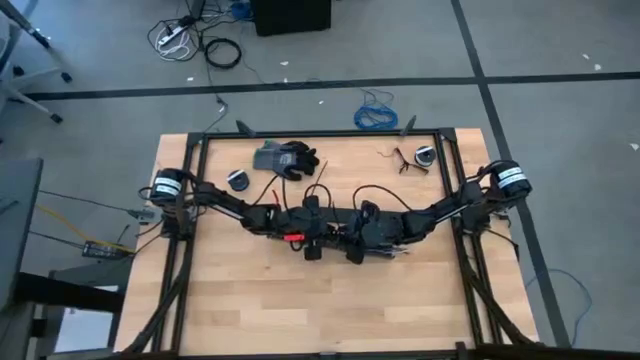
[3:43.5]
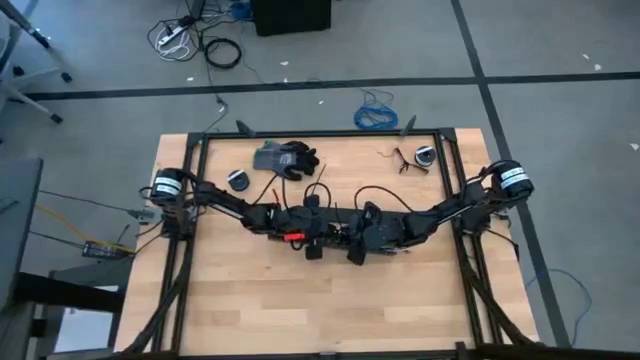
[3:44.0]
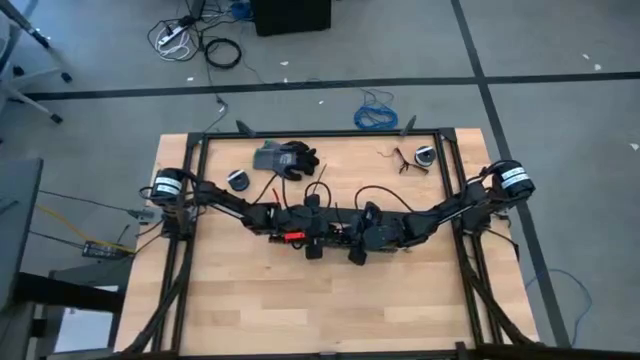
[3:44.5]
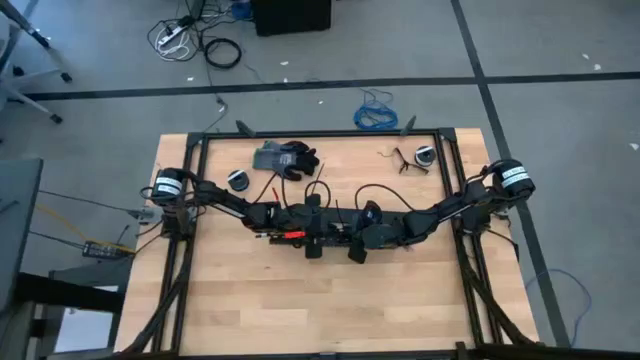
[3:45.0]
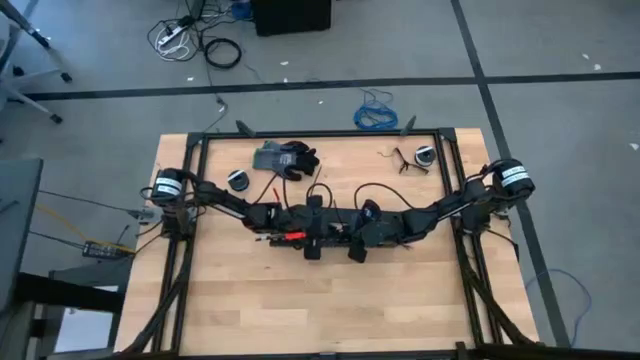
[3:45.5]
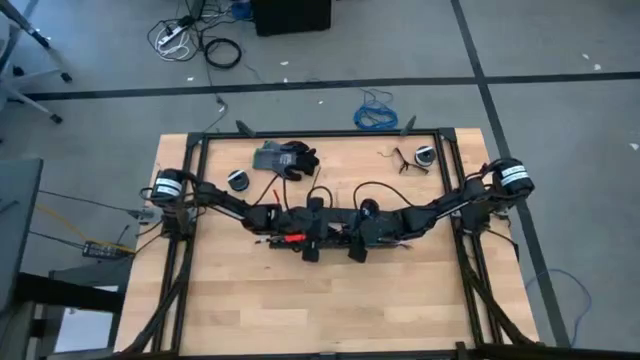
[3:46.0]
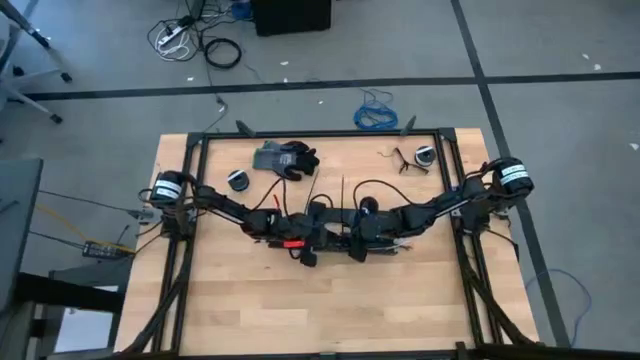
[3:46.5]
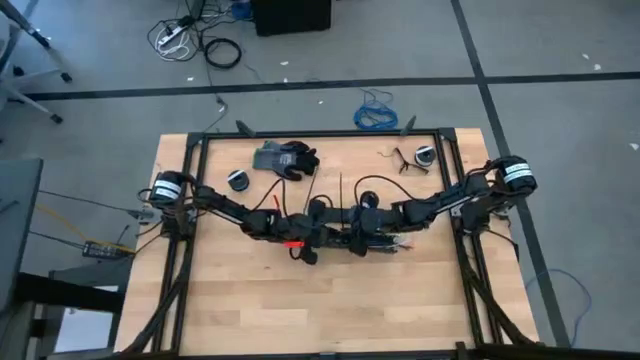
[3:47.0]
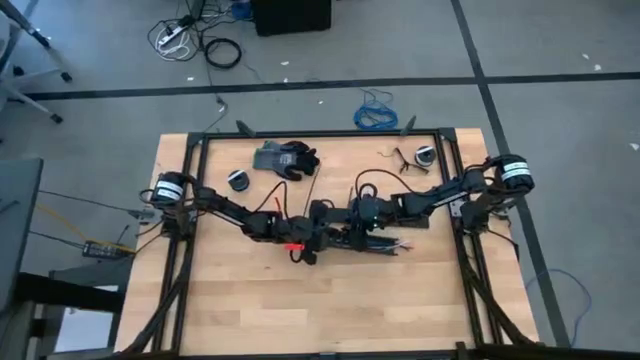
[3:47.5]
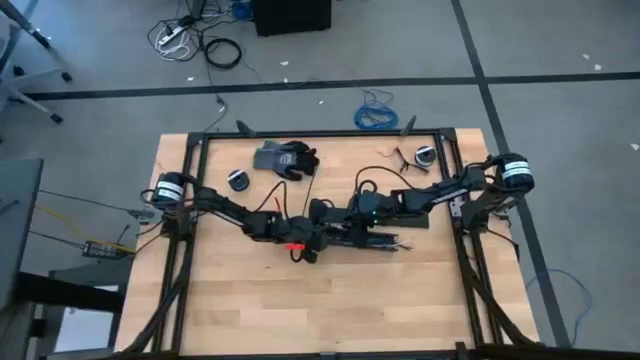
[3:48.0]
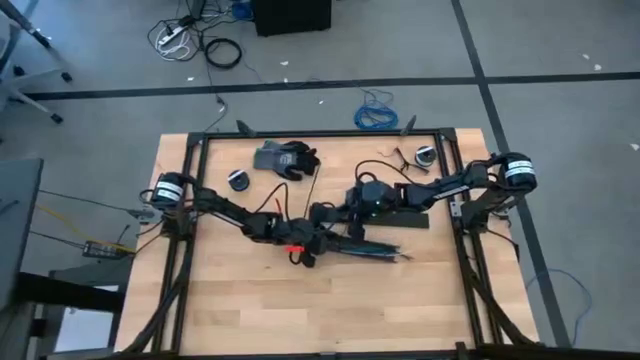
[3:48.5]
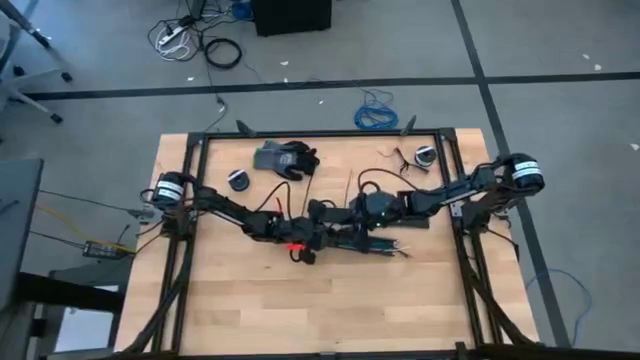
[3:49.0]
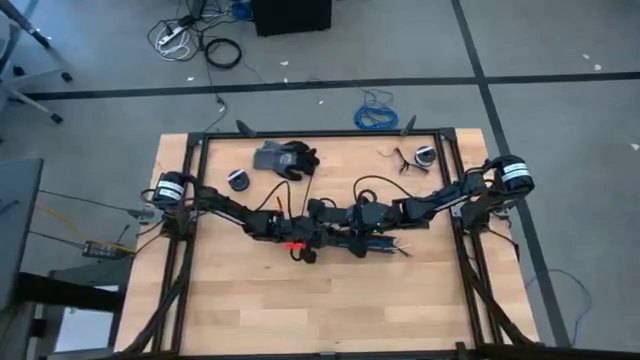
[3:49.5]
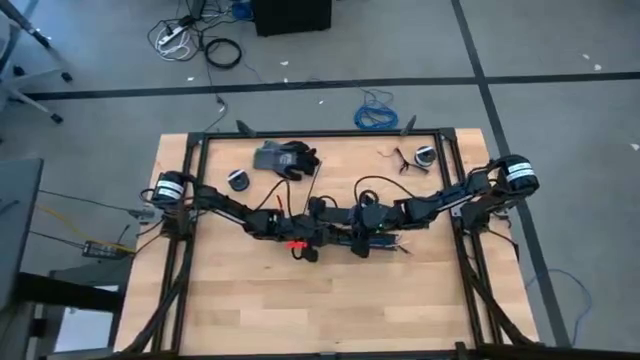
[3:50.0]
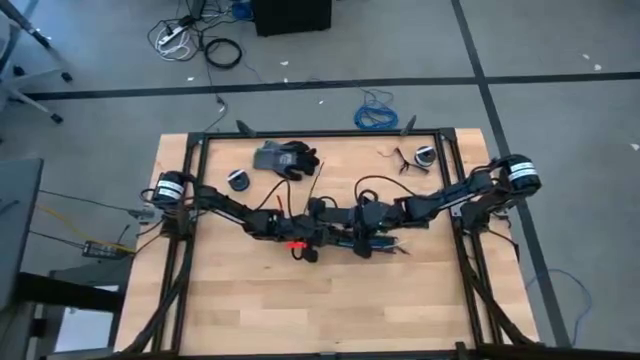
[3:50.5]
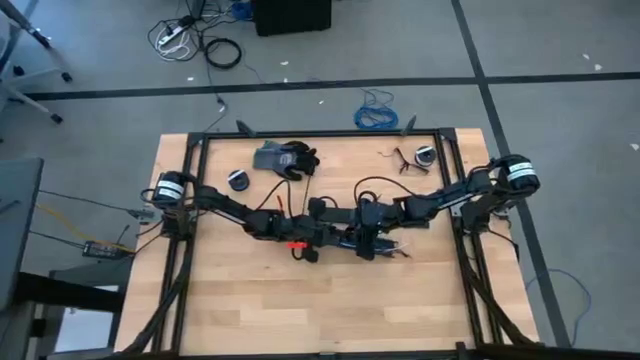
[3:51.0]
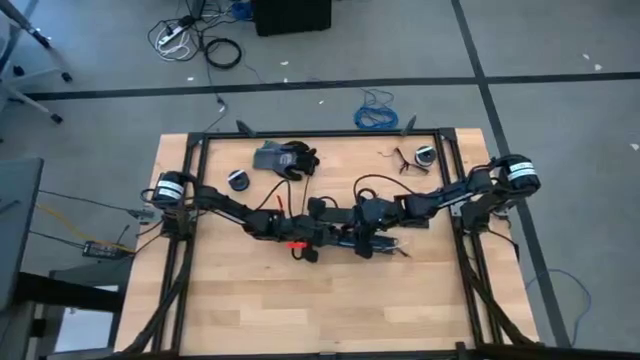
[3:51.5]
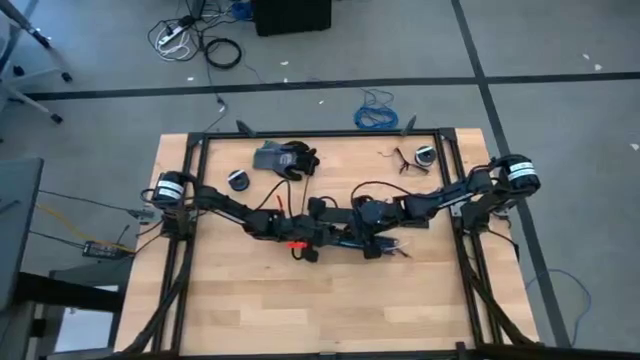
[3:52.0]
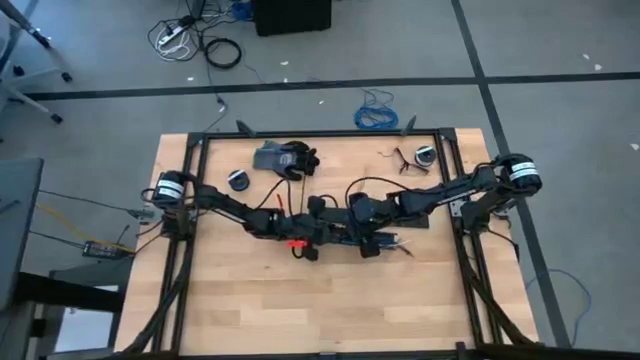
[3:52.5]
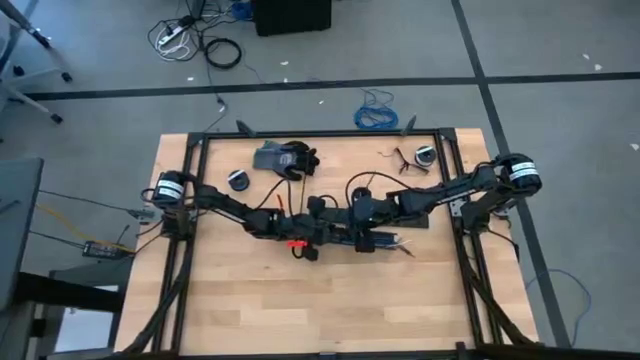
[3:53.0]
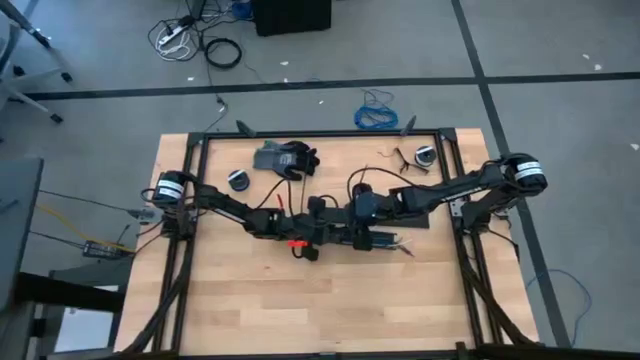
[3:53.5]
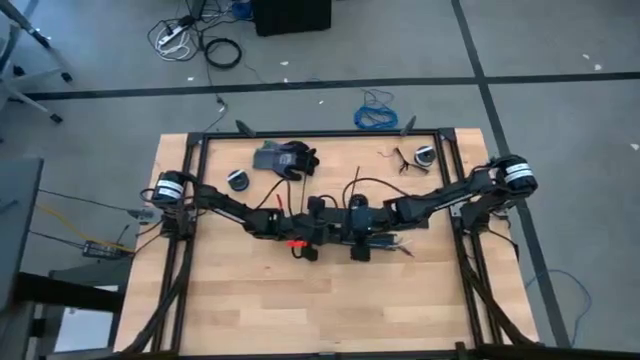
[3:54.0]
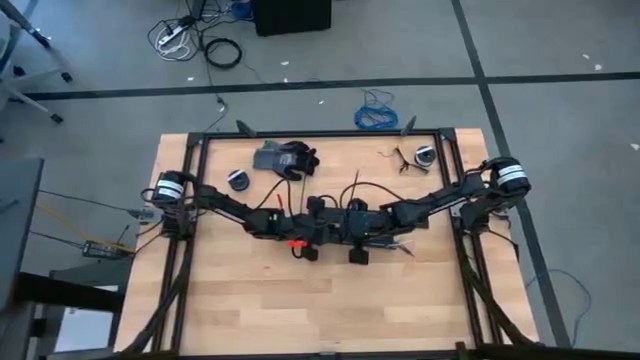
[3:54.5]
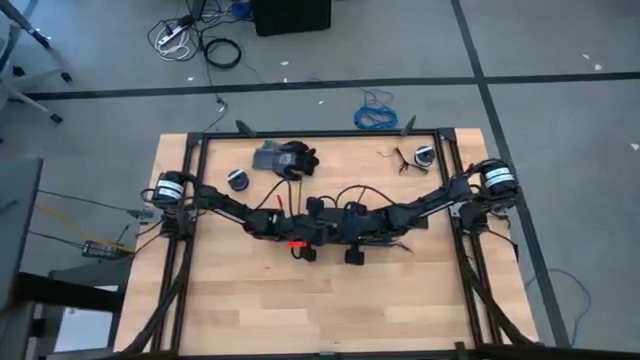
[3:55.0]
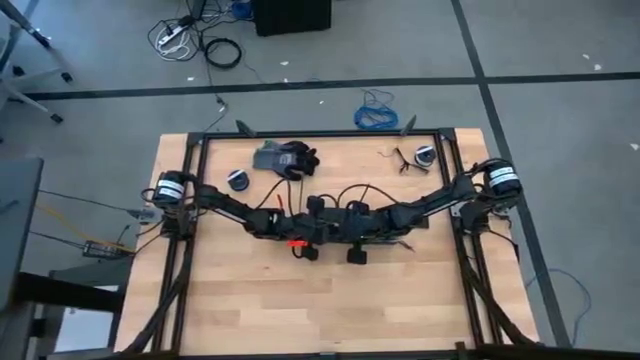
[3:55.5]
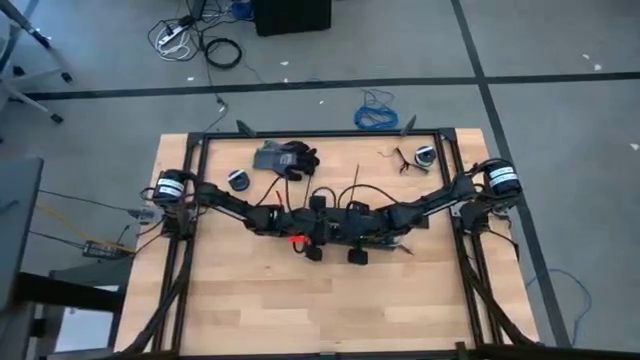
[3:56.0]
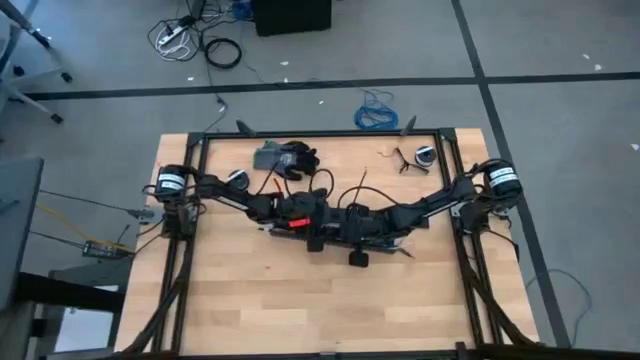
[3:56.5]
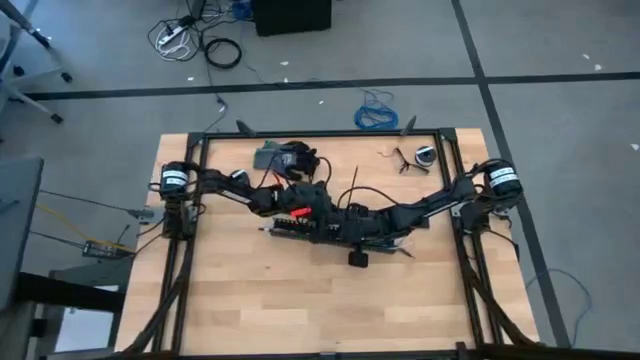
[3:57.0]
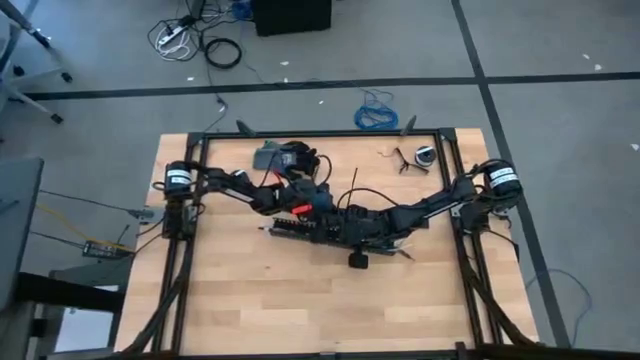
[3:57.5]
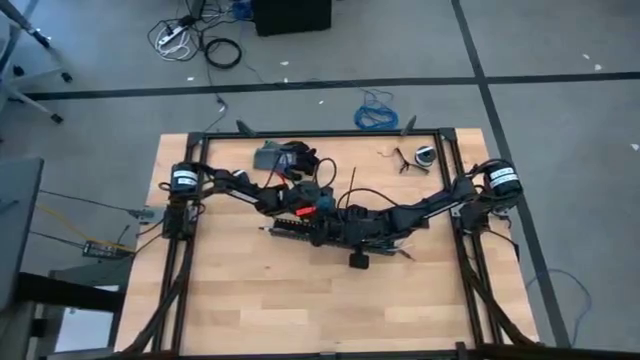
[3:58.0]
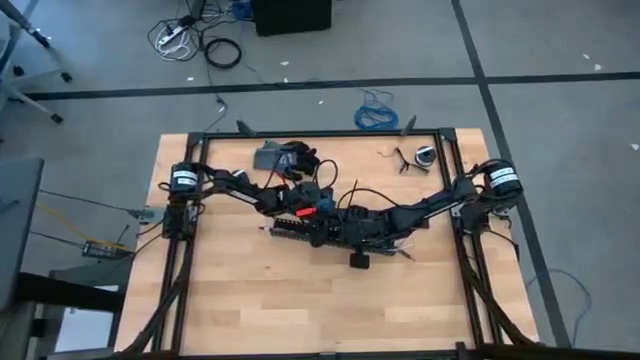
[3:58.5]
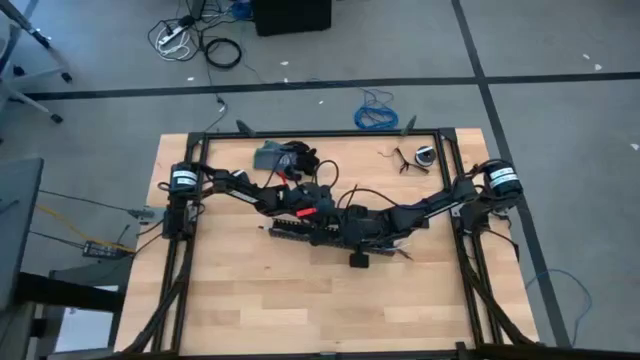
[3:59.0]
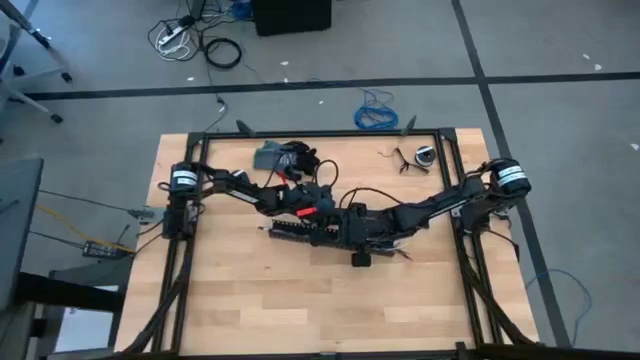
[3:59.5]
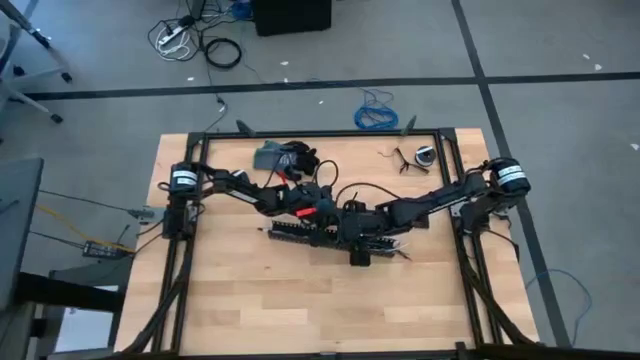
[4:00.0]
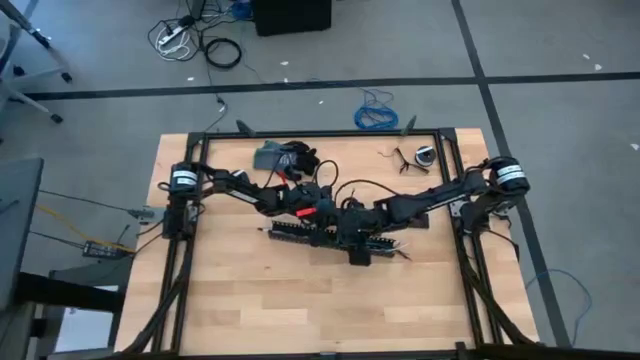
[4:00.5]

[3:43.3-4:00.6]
Task: Ziptie cables
Put the cable wires in the black cable duct

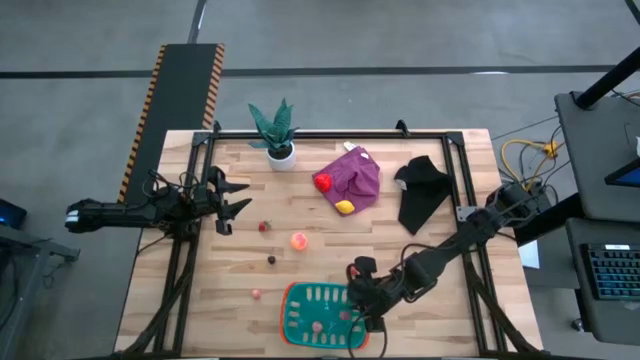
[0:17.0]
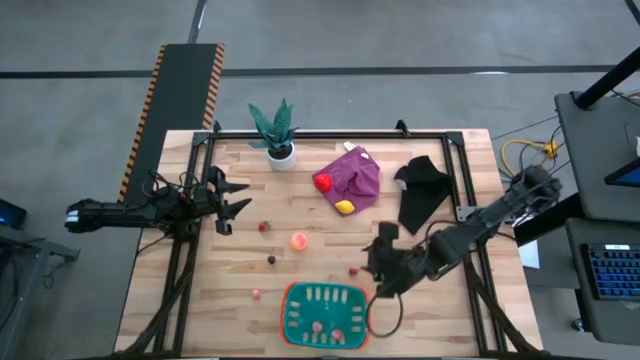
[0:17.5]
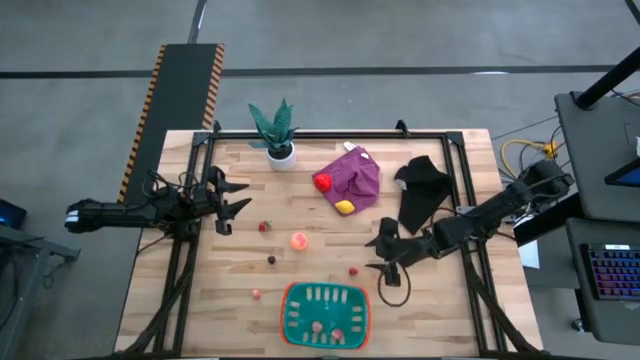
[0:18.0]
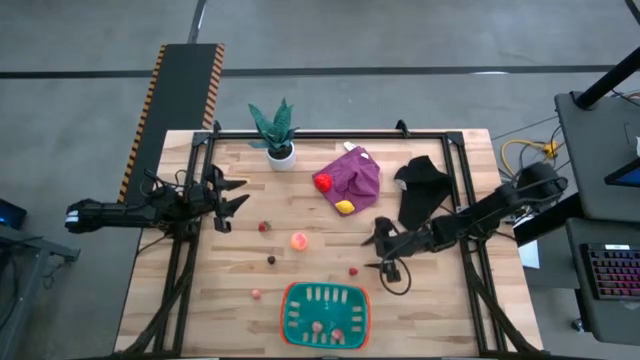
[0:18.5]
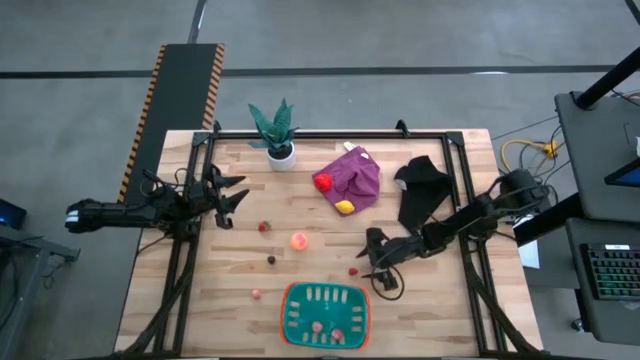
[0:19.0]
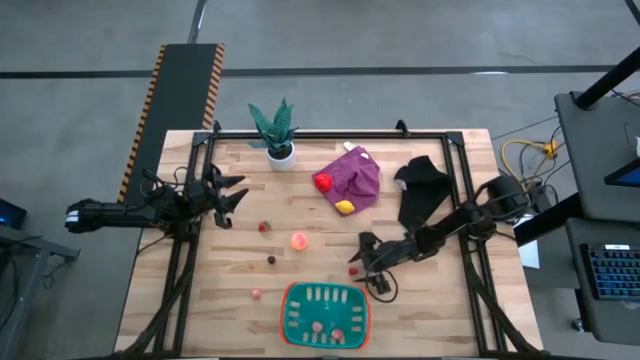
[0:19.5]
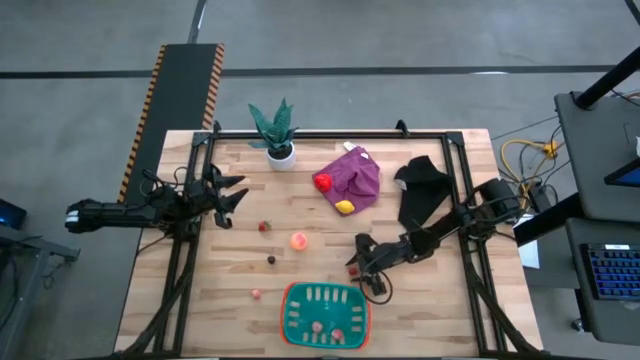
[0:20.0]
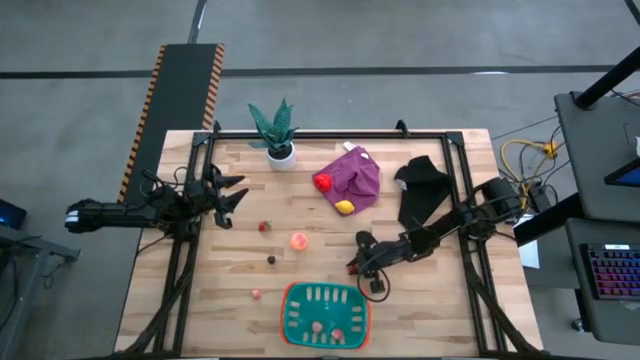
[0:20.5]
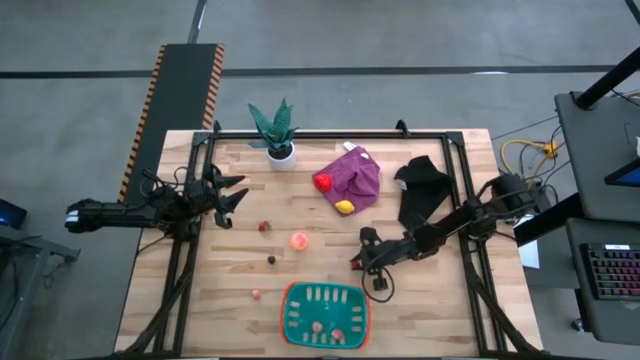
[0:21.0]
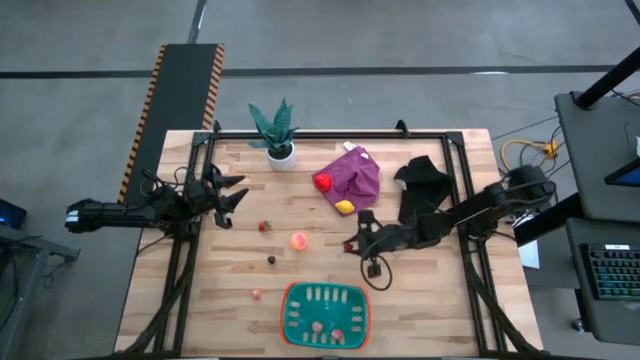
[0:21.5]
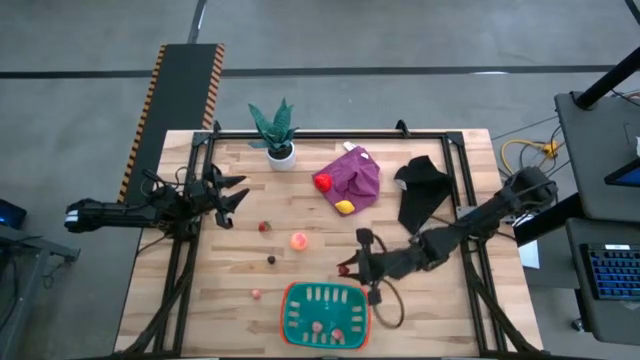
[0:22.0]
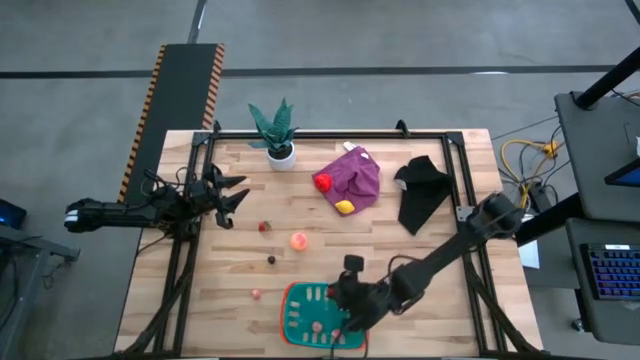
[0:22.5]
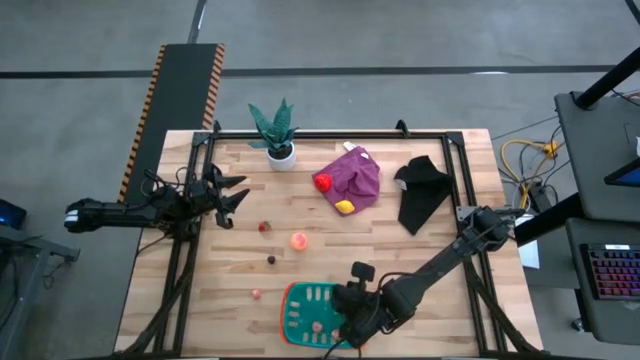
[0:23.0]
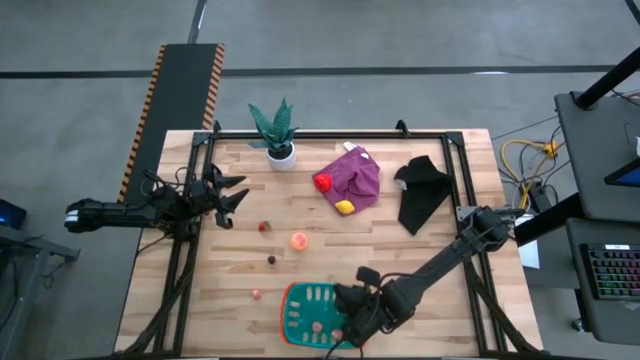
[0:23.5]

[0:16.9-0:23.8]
Task: Pick and placing Produce into tupperware
Put the red raspberry into the green basket
